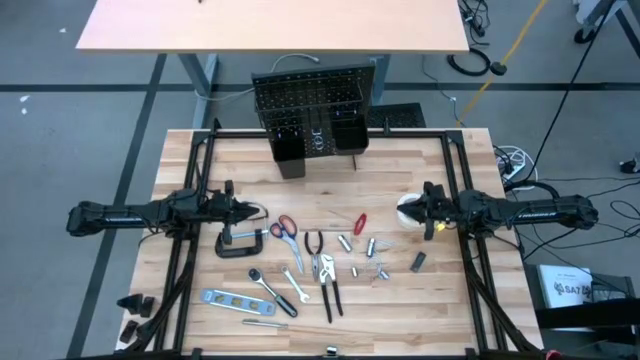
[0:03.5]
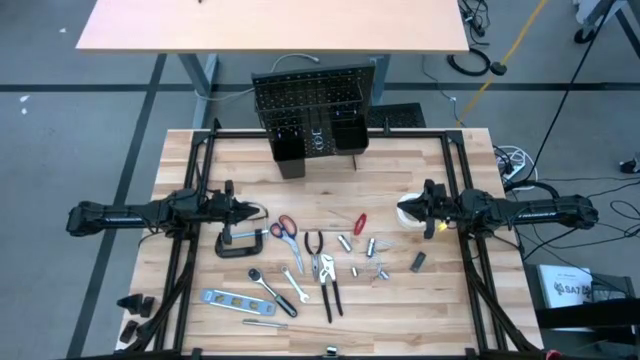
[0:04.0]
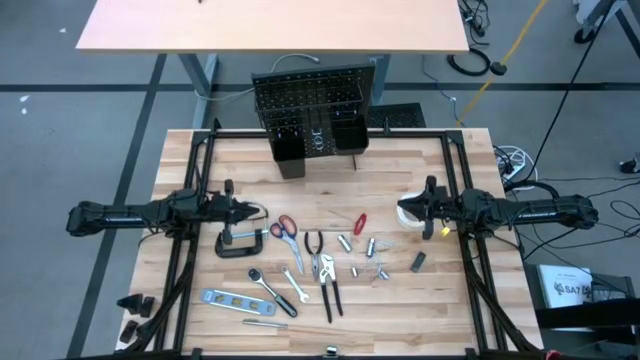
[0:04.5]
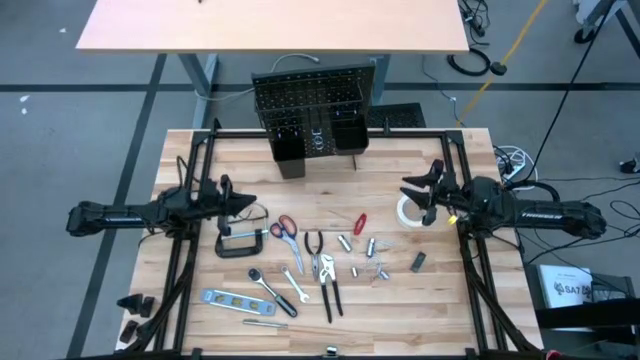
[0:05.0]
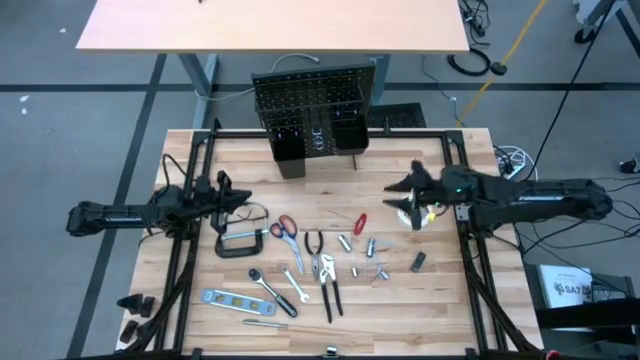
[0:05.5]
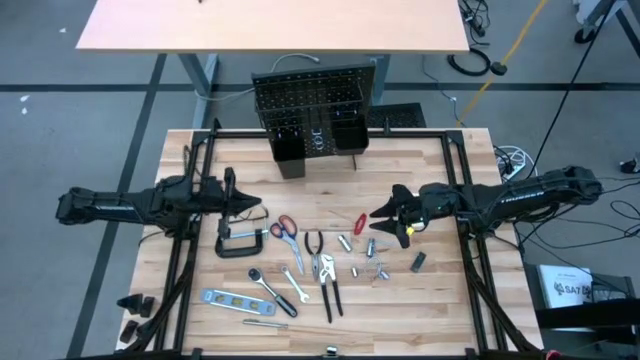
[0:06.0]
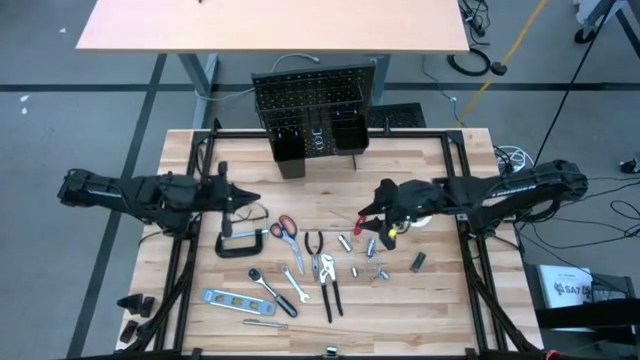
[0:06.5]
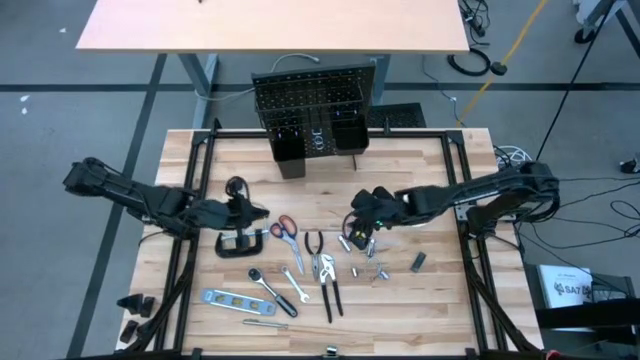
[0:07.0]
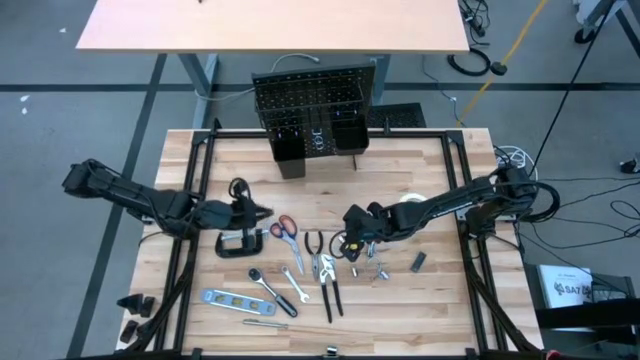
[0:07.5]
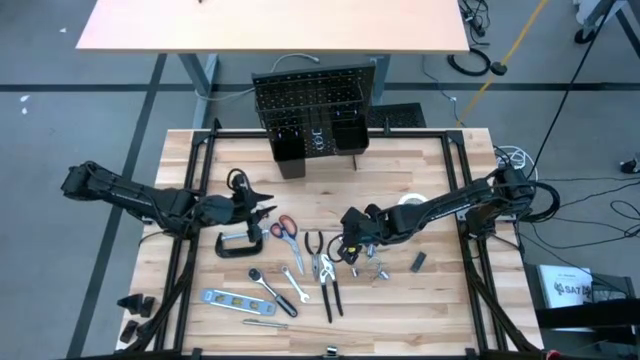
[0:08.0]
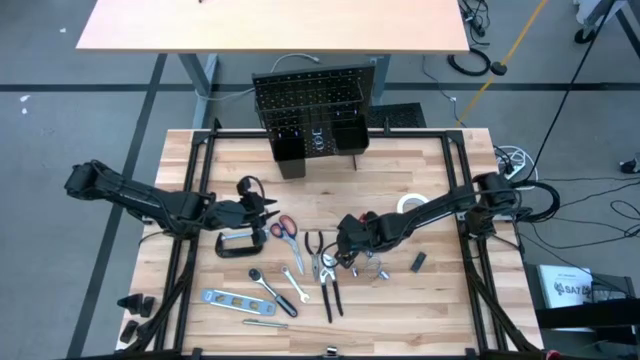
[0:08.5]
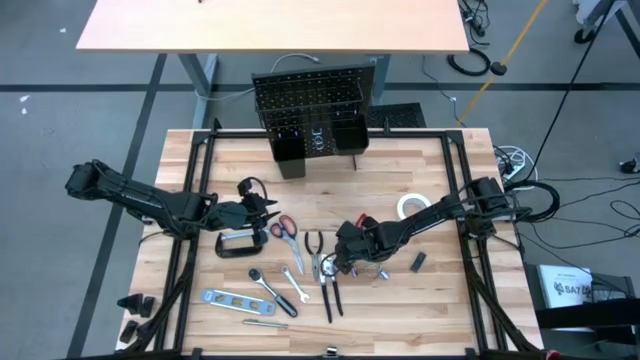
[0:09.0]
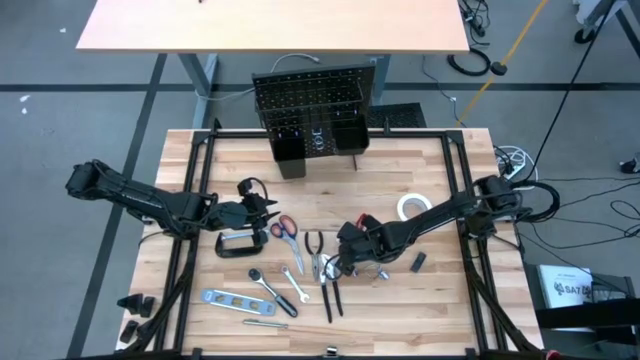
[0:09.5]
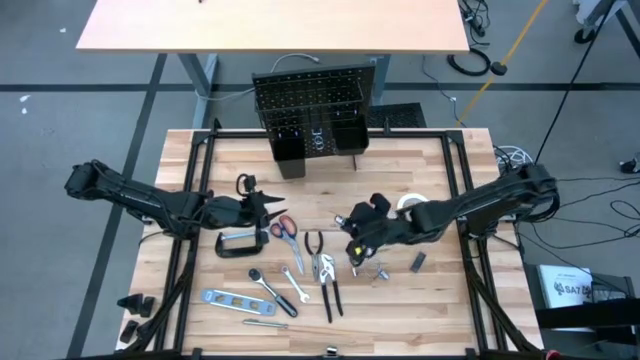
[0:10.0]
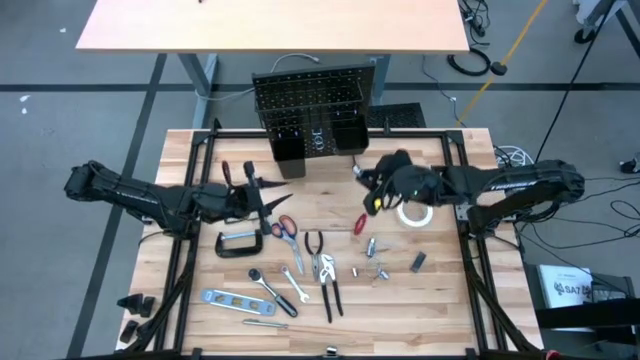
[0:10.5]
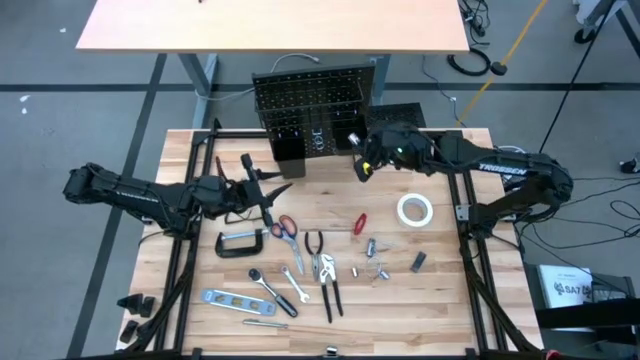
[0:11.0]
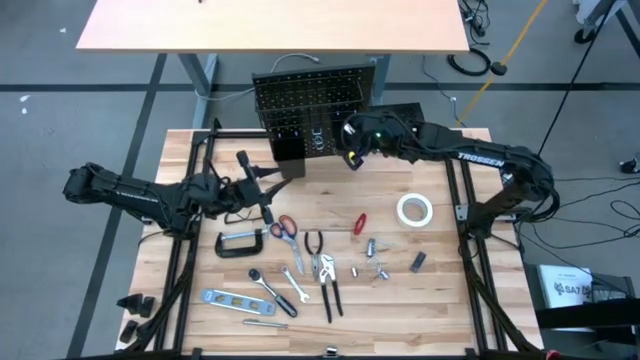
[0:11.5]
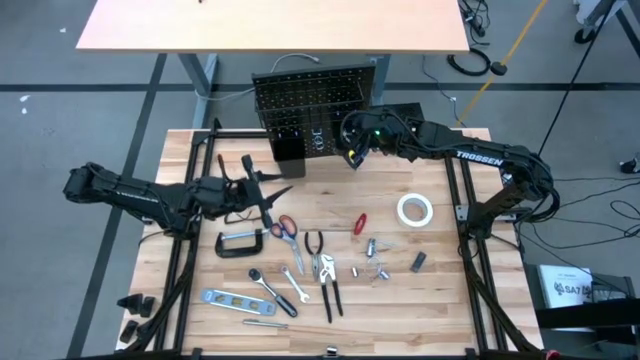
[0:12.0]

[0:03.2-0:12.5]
Task: Hang tools onto peg board
Put the left extension bar on the right black bin on the peg board

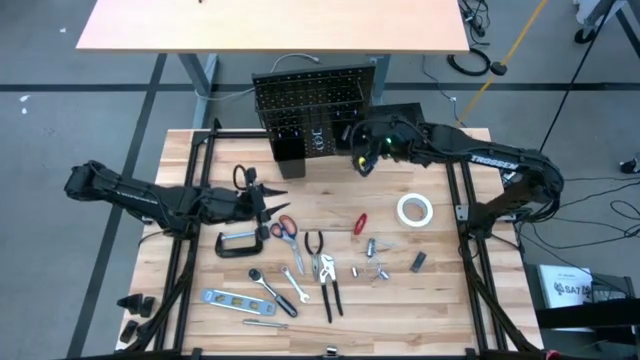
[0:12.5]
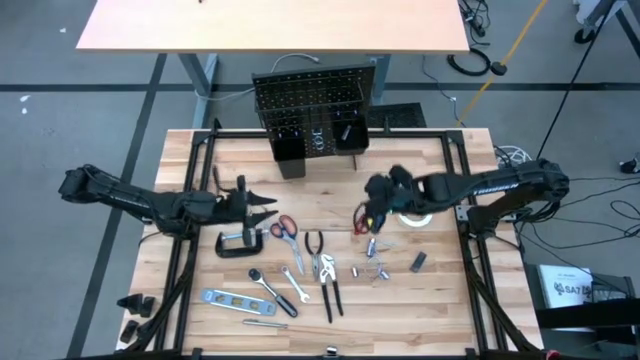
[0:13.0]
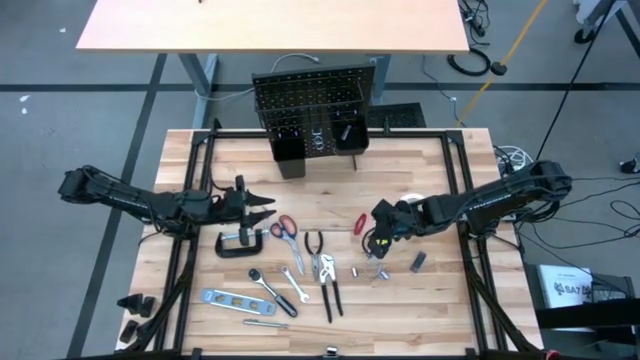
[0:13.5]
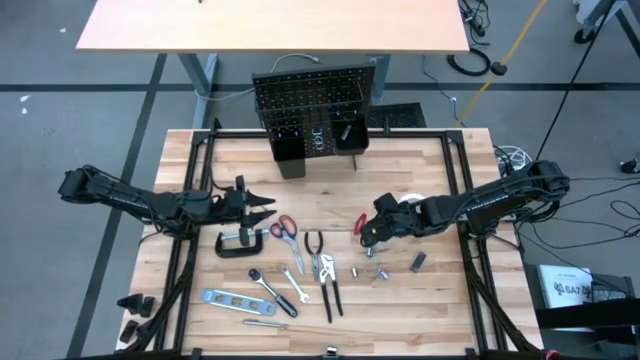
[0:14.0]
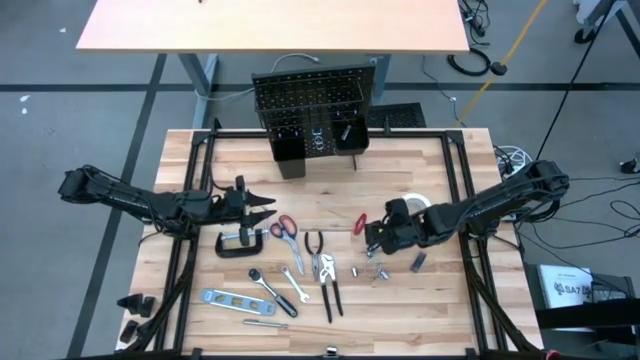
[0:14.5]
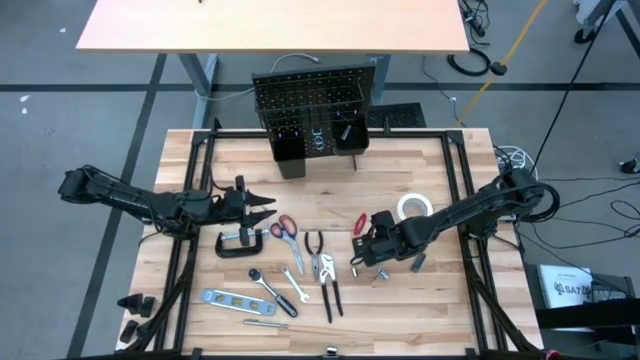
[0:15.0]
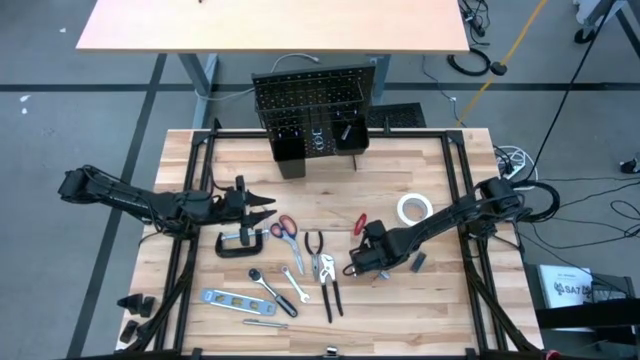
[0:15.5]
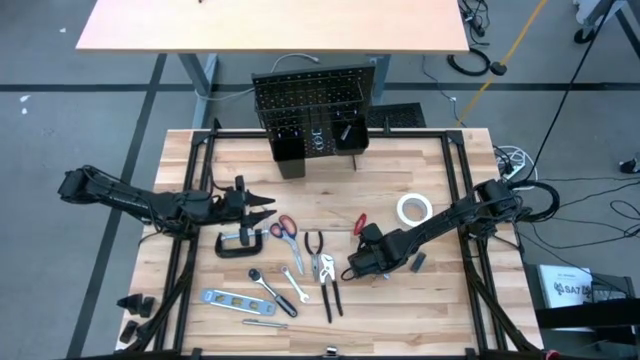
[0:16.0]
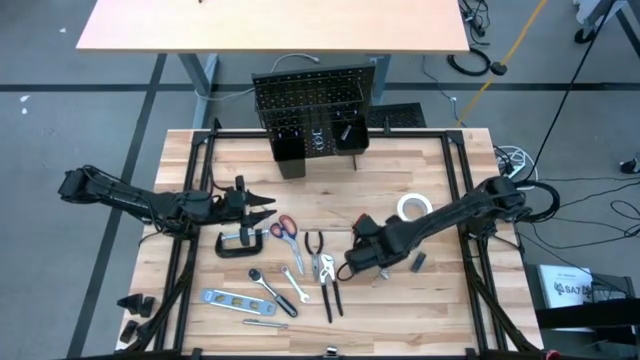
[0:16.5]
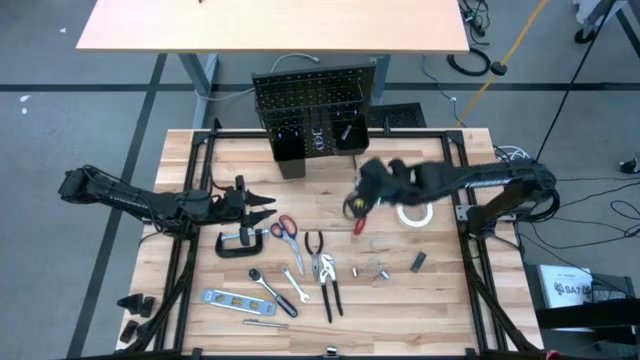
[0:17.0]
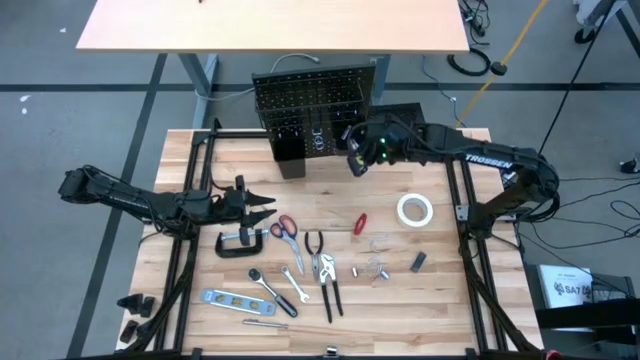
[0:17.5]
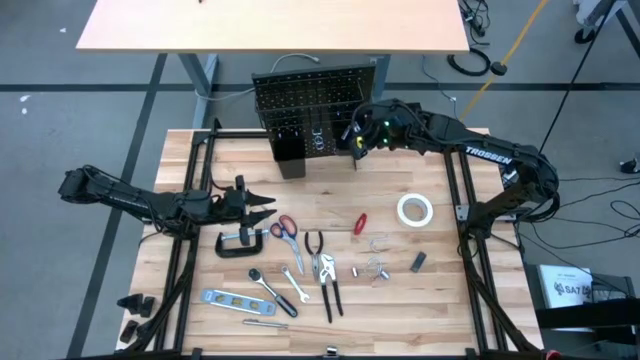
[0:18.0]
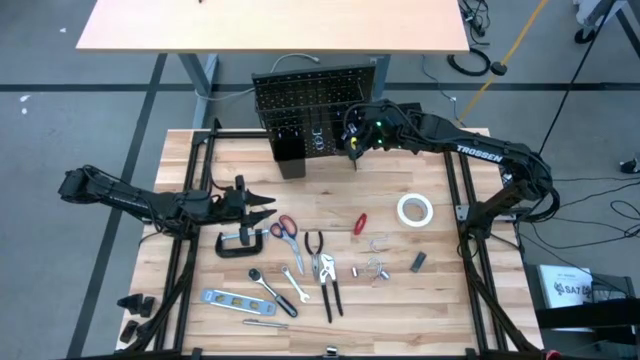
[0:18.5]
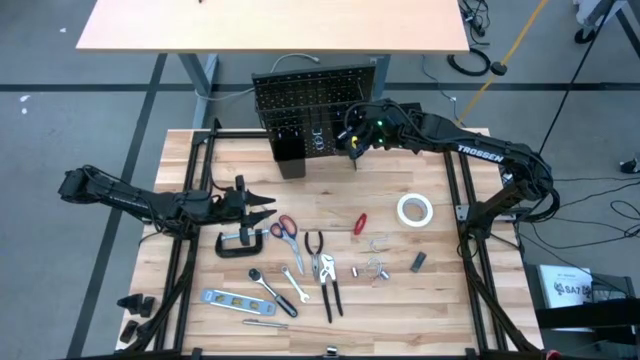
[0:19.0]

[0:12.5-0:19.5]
Put the extension bar on the right black bin on the peg board

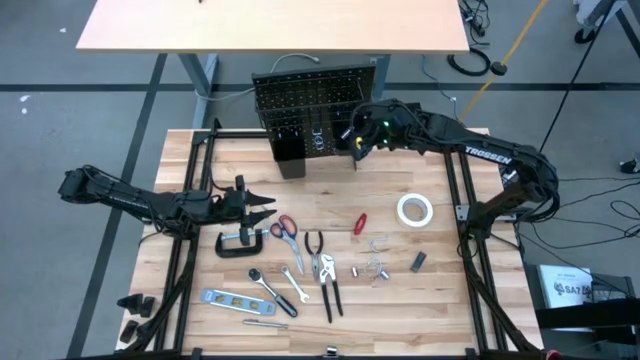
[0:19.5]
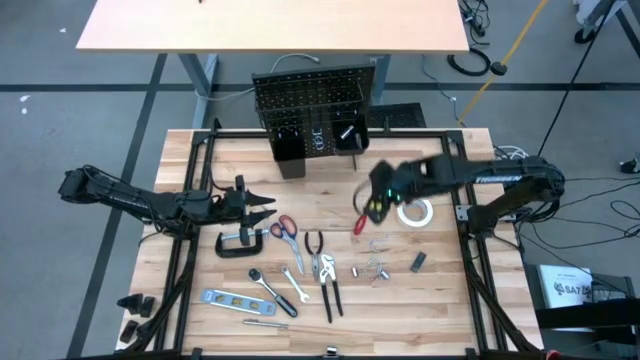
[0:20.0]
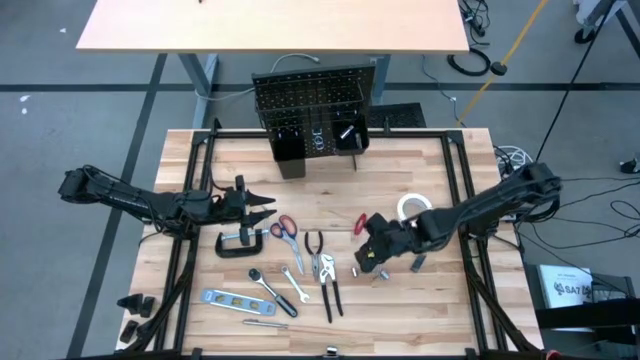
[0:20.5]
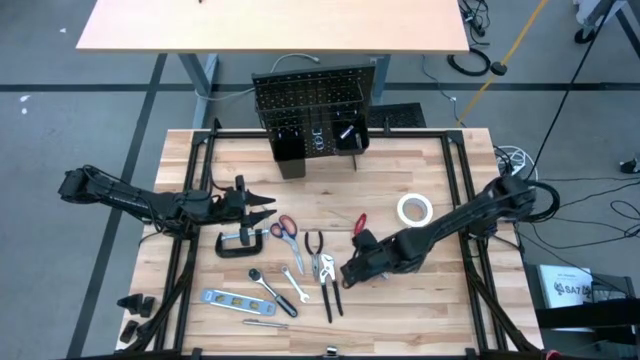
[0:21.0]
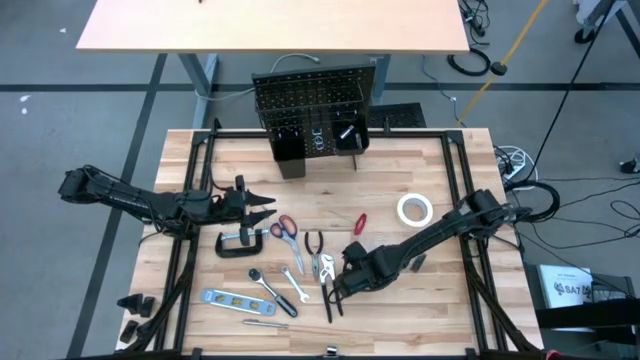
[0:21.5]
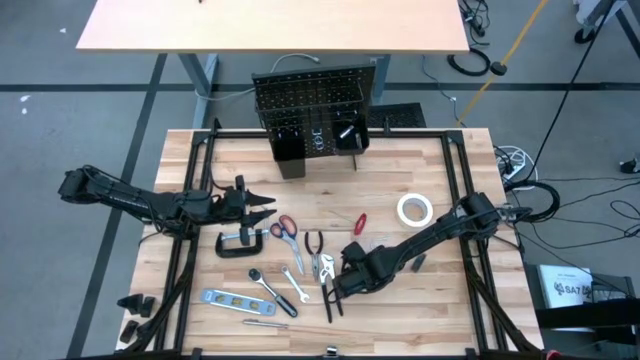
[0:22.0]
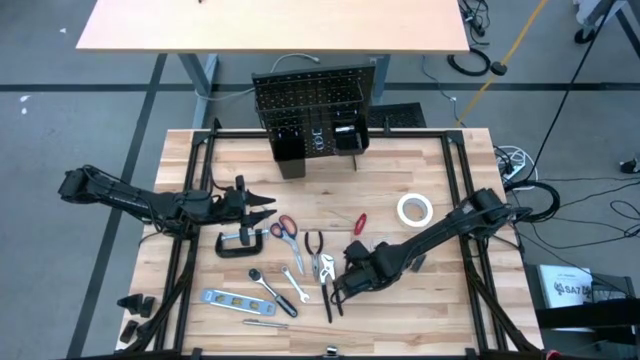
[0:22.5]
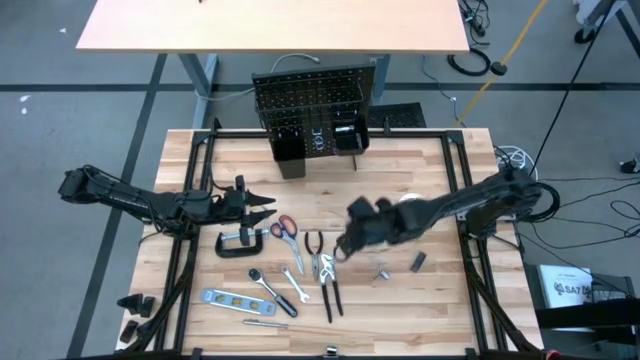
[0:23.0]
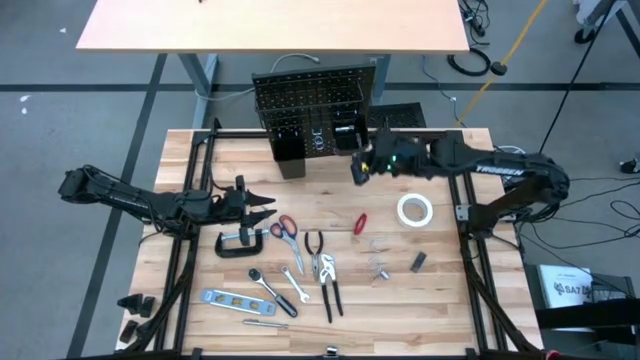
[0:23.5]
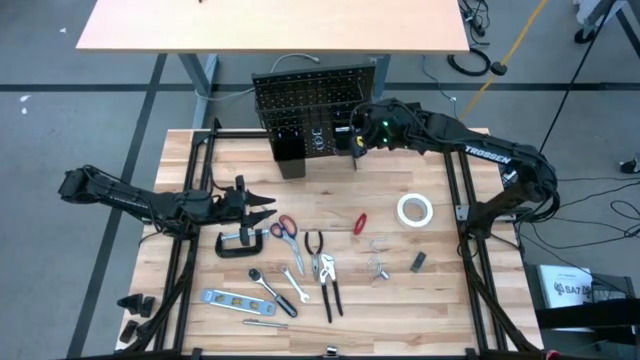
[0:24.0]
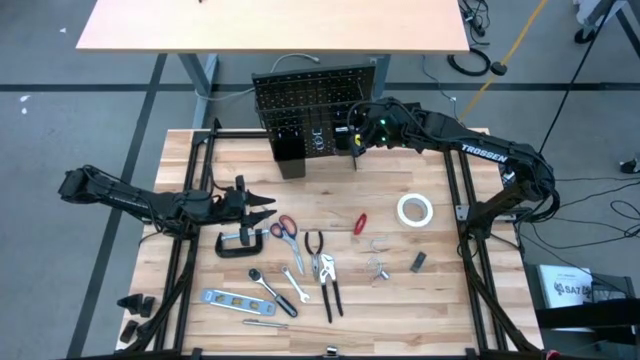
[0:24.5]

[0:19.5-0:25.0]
Put the left wrench socket on the right black bin on the peg board

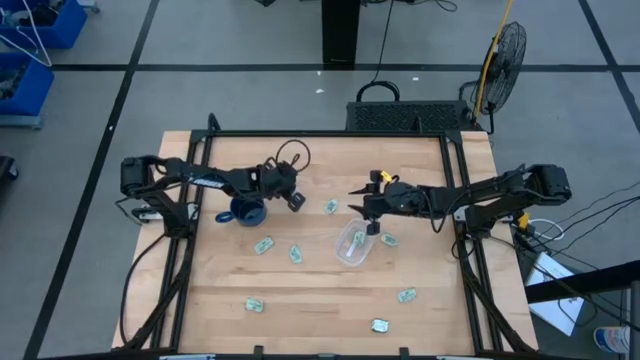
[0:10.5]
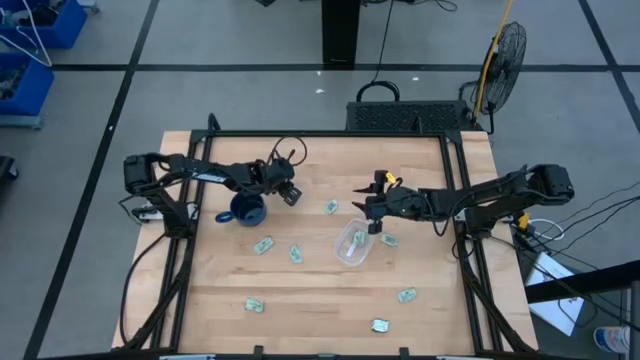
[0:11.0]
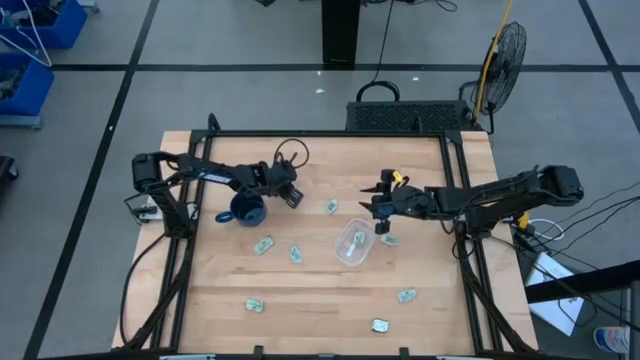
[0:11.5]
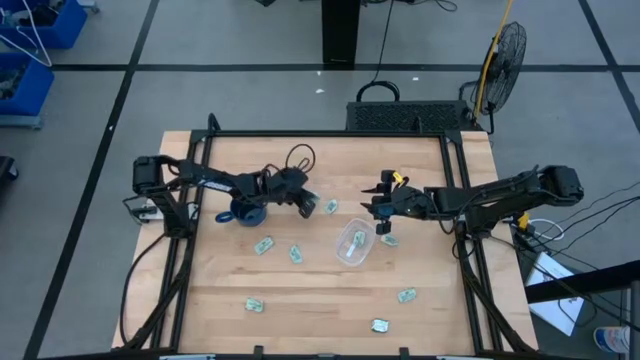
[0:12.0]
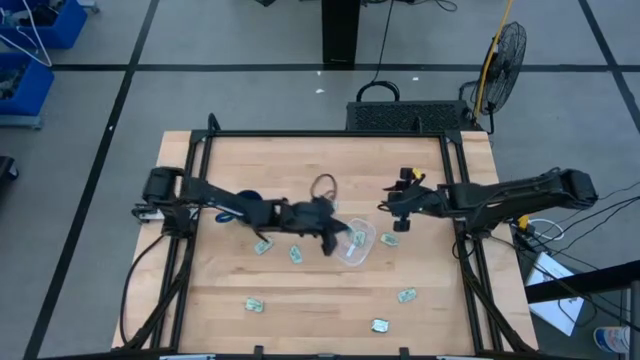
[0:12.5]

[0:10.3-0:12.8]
Task: Pick and place Stevia / Truvia into bins
Put the stevia packet into the transparent container
